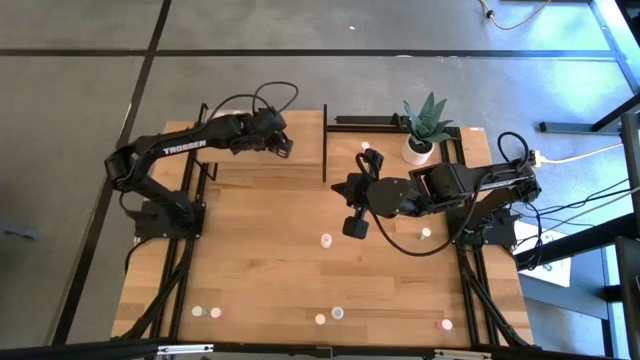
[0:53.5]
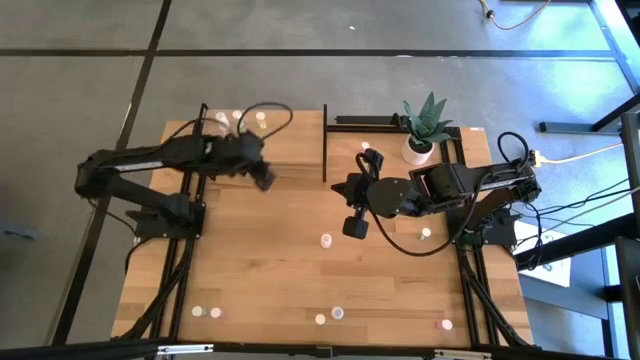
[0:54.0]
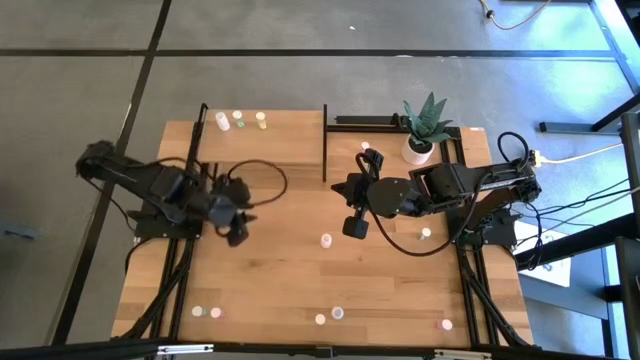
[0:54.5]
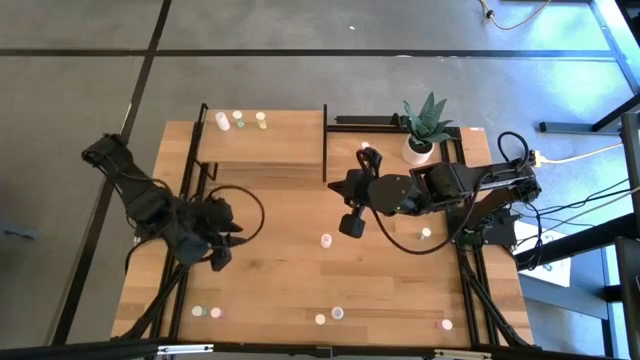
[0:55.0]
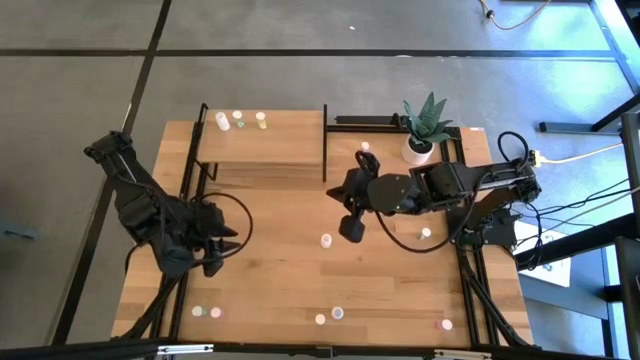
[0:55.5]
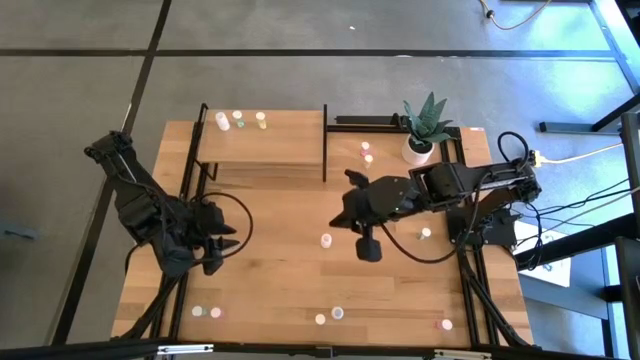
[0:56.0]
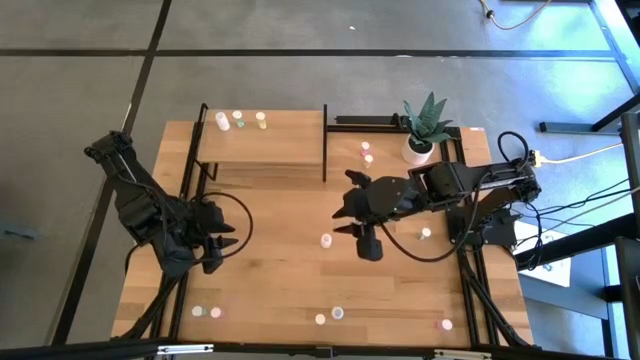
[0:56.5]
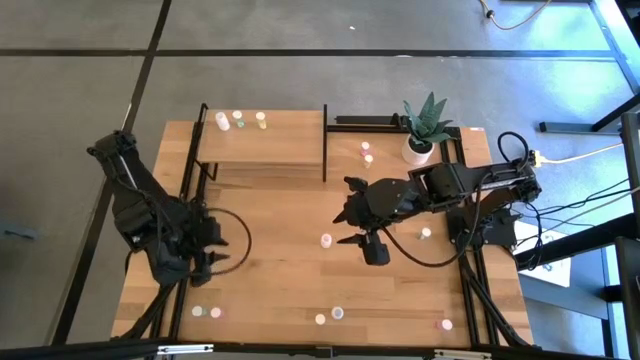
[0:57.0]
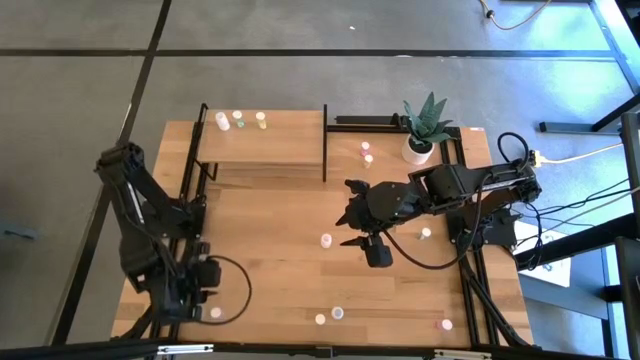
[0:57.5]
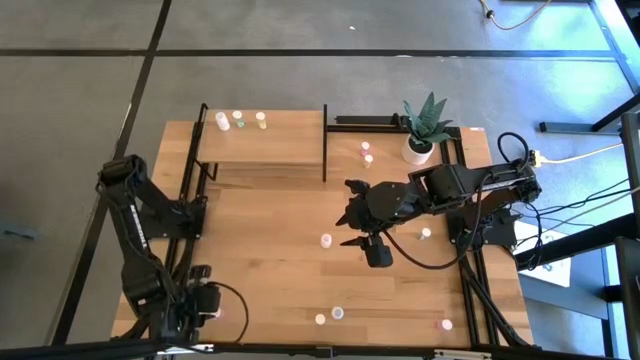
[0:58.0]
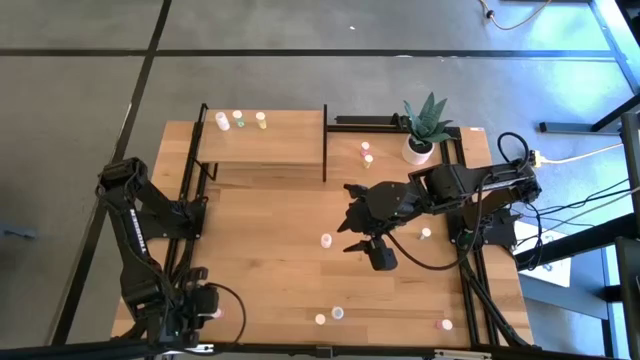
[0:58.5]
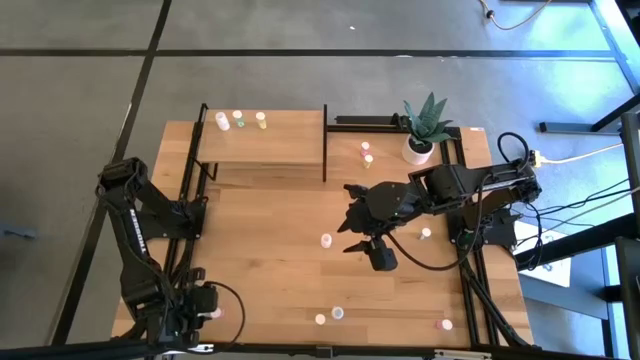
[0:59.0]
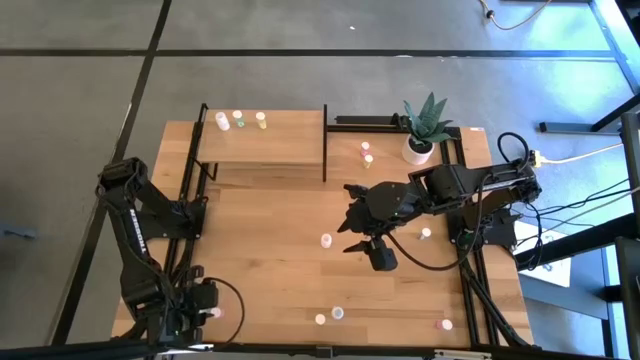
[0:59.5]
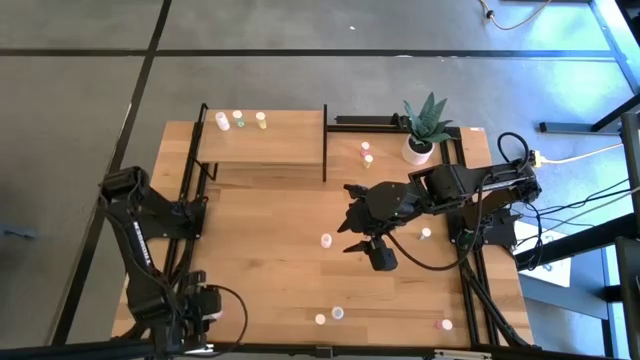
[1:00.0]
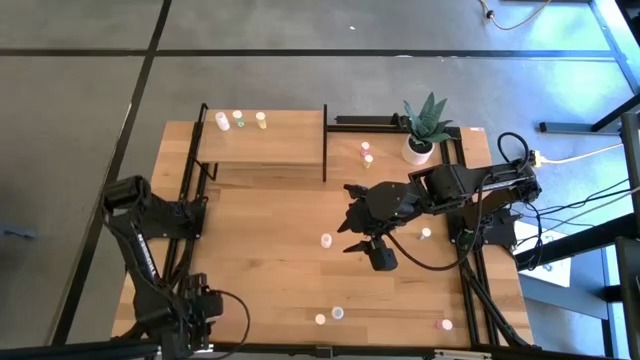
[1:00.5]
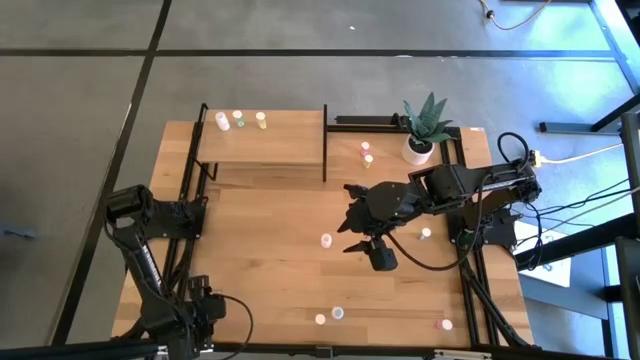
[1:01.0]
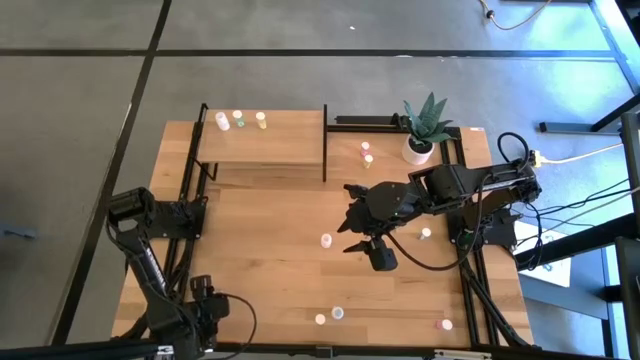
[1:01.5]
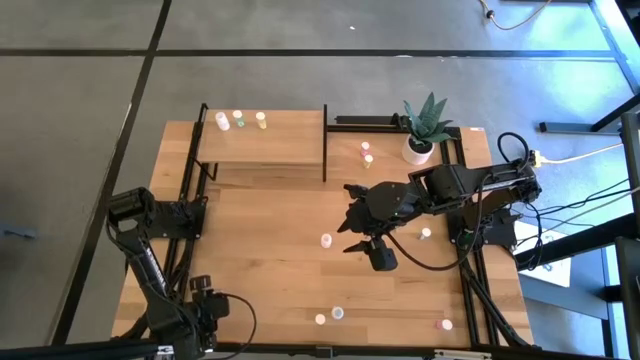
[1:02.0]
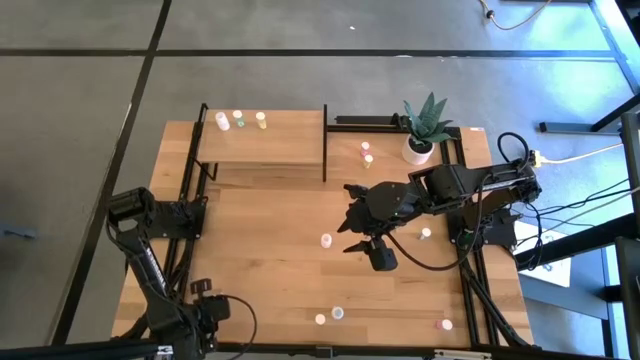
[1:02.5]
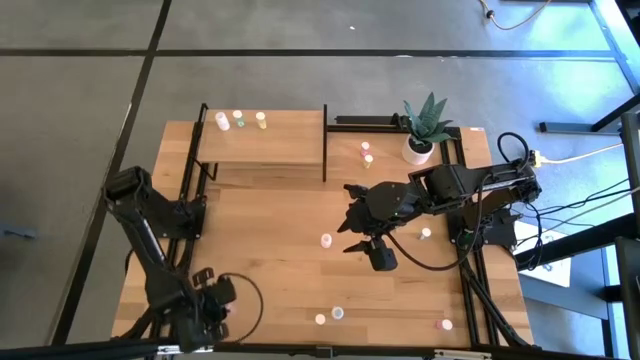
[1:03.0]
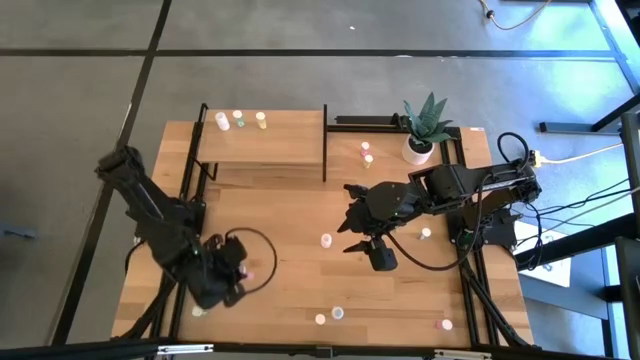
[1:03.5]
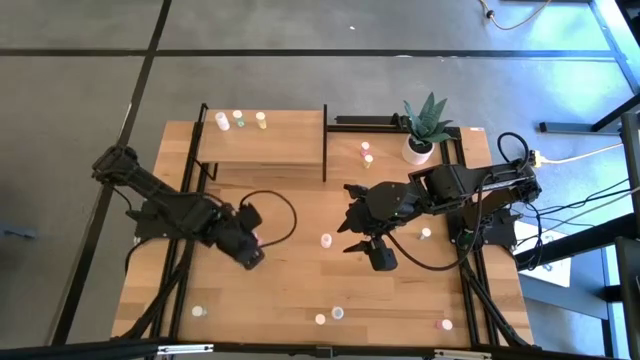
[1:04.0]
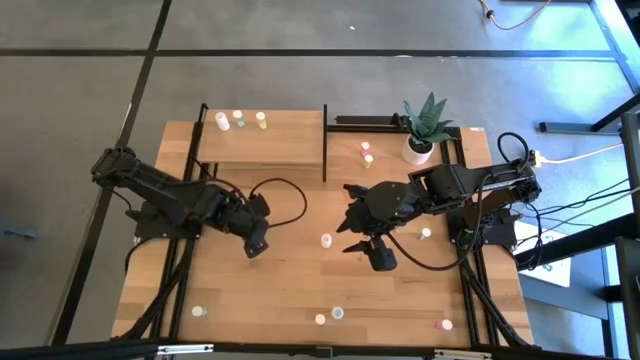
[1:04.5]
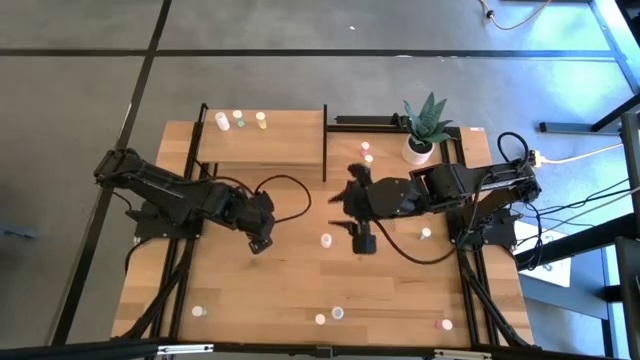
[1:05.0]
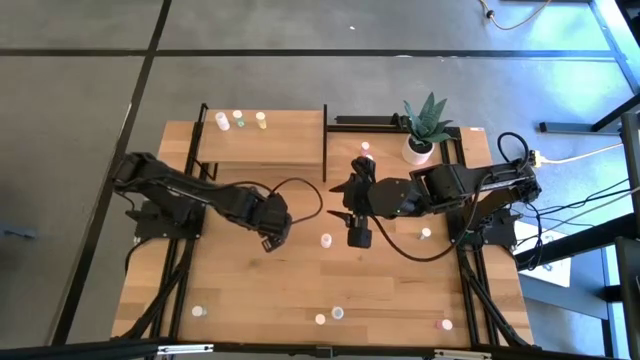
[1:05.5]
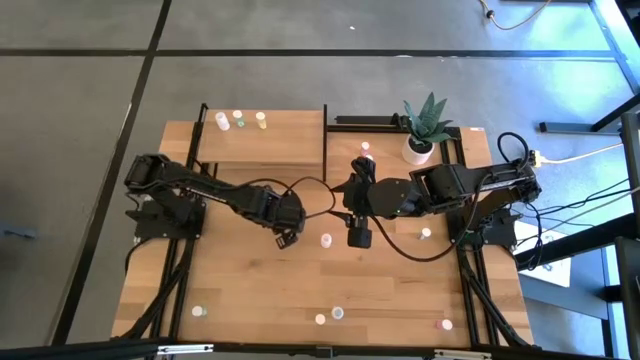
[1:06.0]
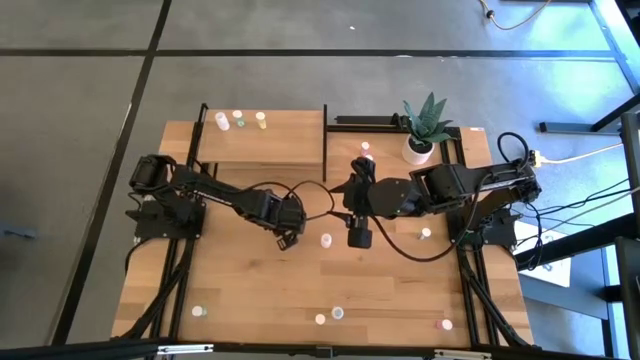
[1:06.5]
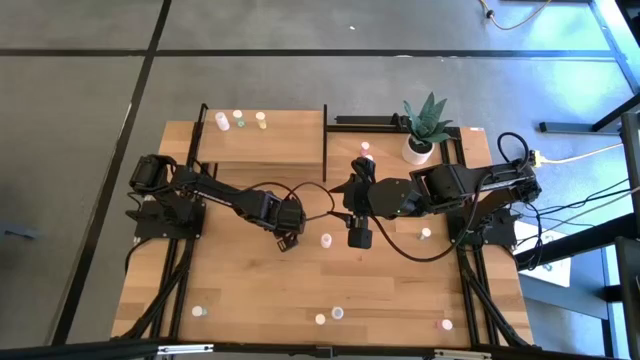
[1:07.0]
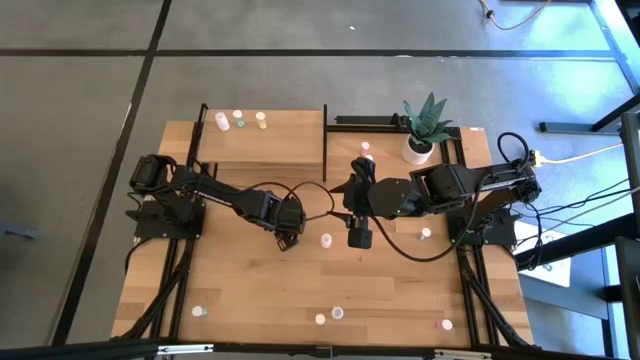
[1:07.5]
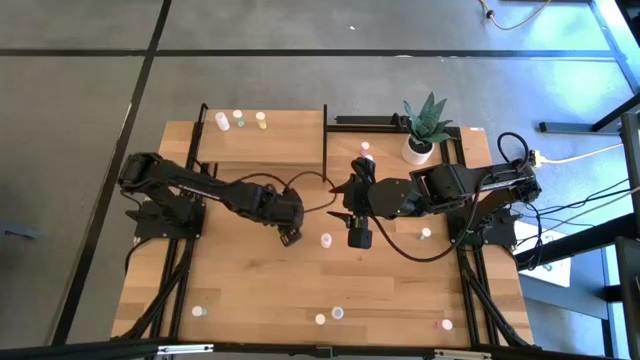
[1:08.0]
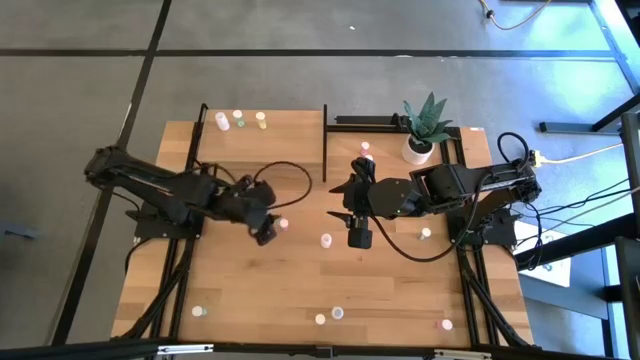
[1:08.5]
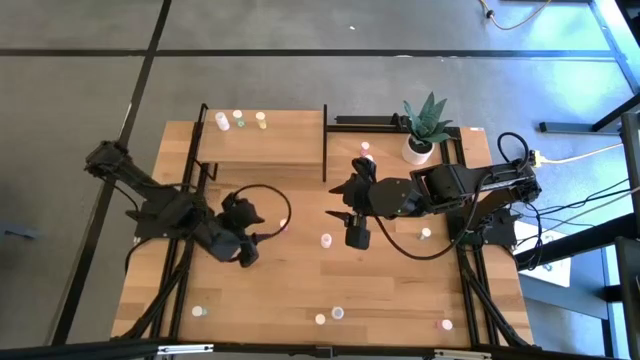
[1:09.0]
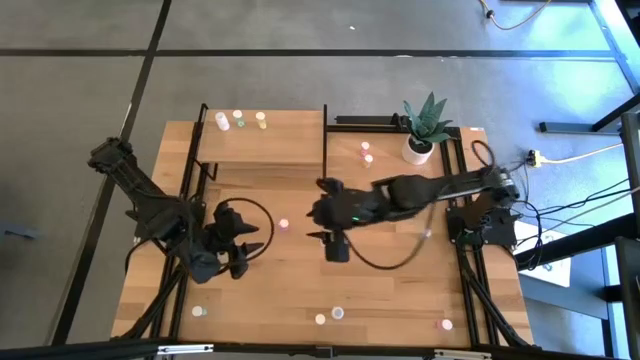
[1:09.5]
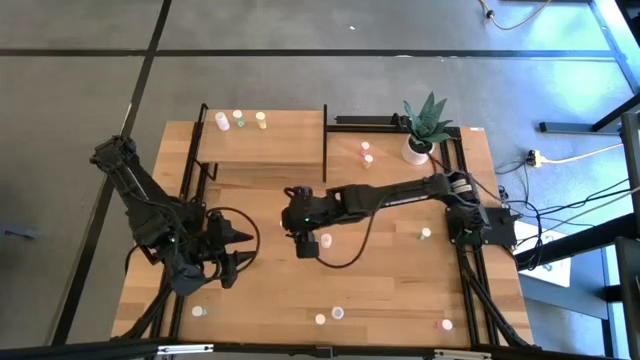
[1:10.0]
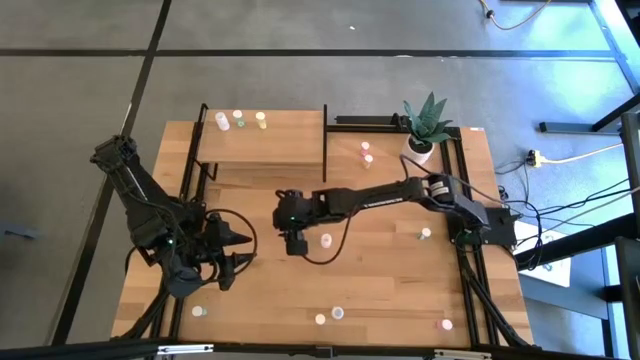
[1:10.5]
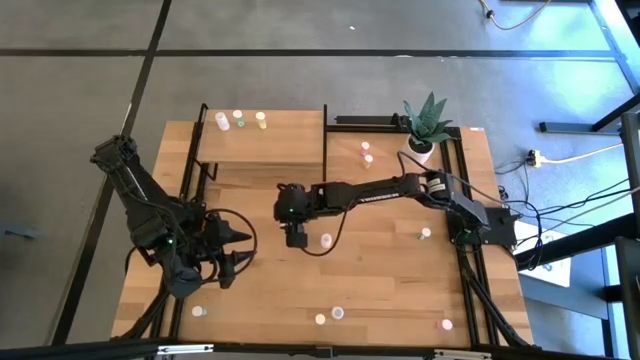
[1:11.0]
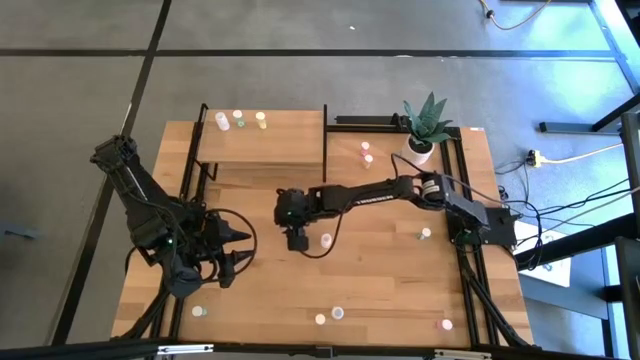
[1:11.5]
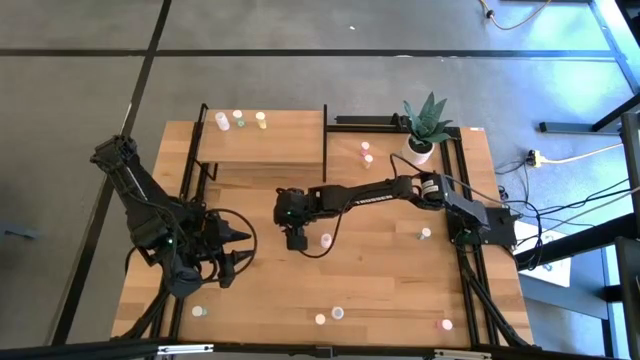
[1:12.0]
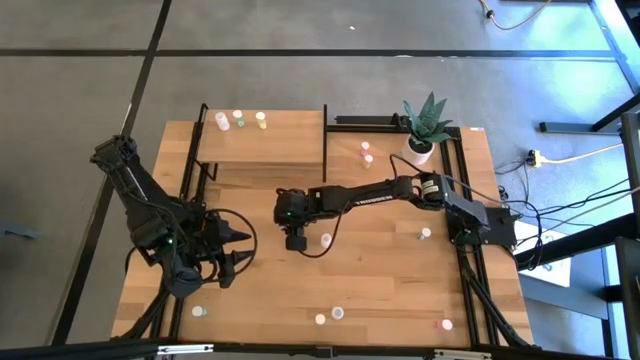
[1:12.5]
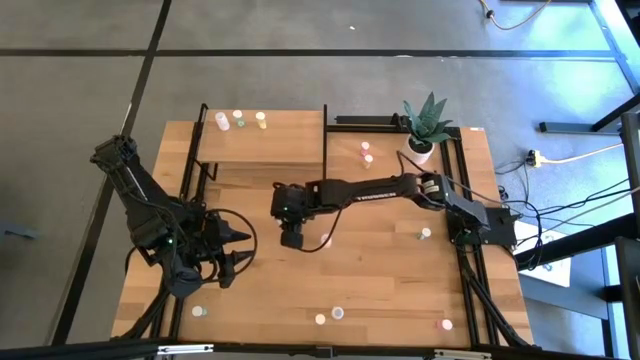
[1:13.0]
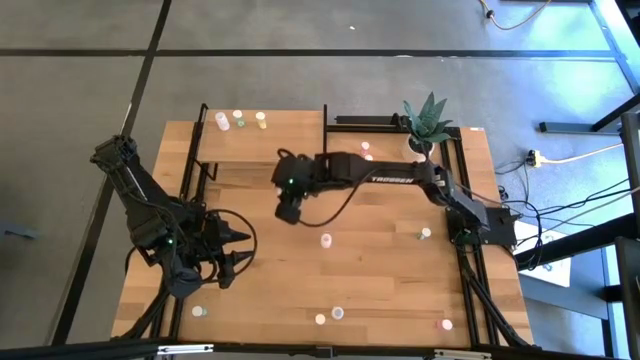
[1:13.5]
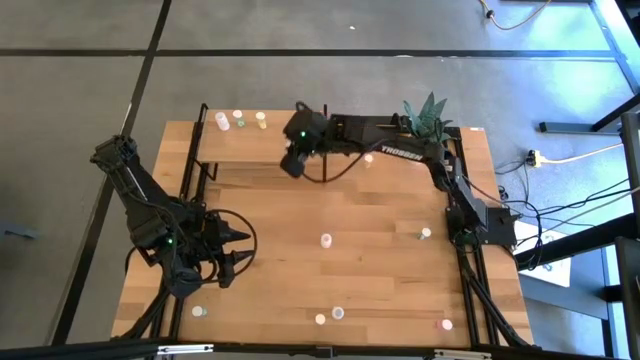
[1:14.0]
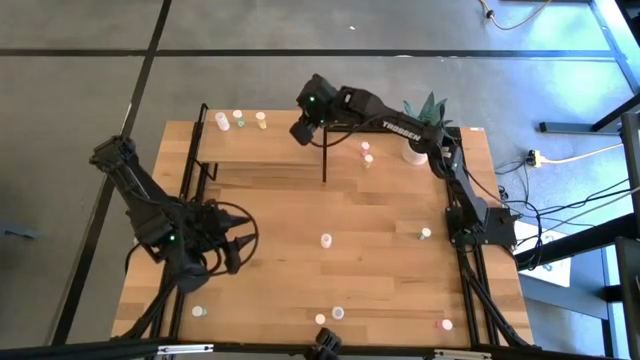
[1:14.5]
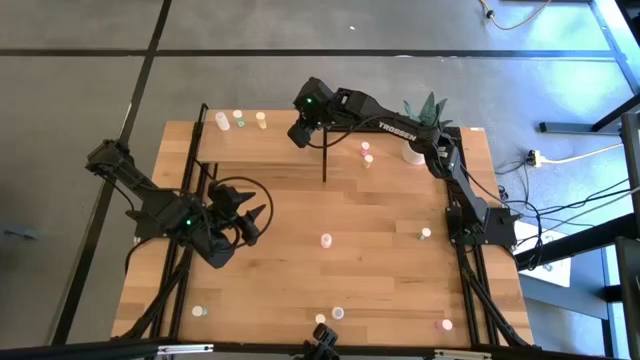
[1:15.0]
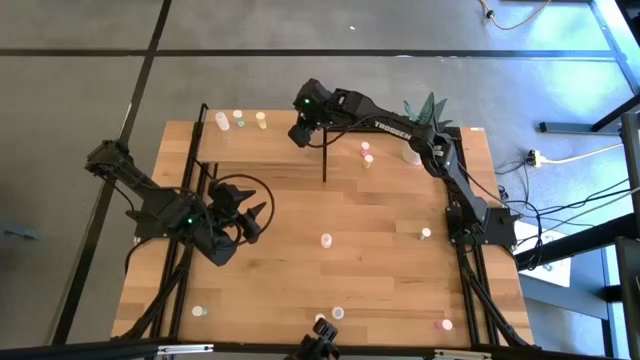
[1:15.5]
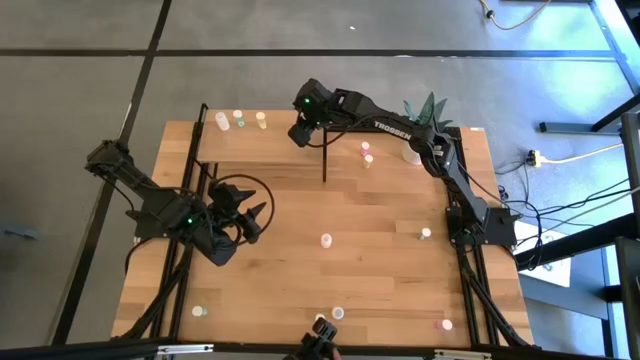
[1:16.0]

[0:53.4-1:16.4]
Task: Pick and place medicine bottles onto shelf by color
Put the bottom pink pill bottle on the shelf
